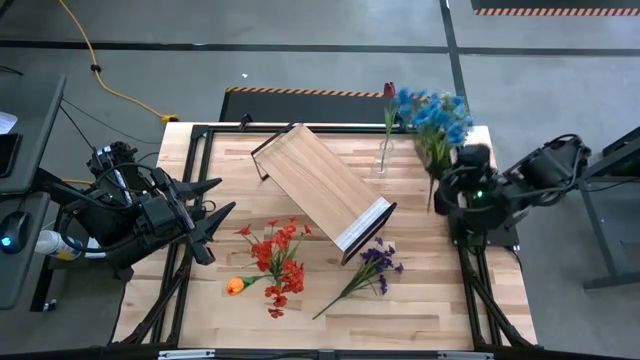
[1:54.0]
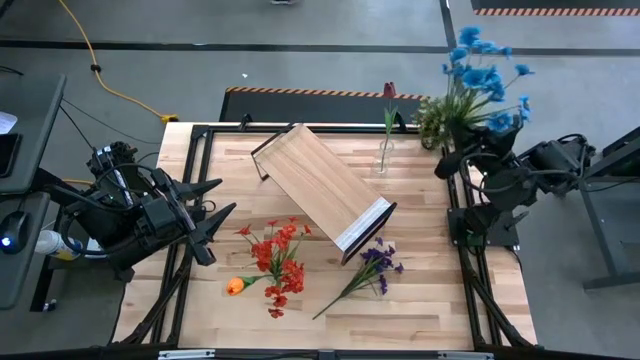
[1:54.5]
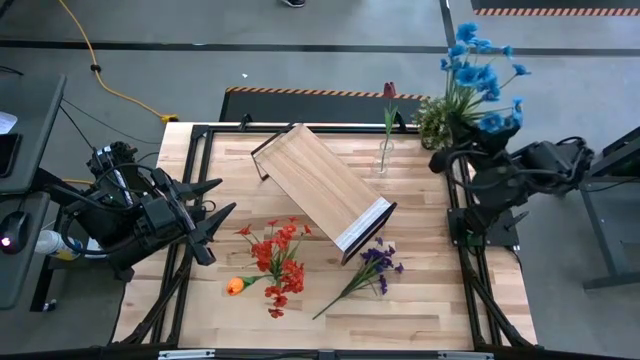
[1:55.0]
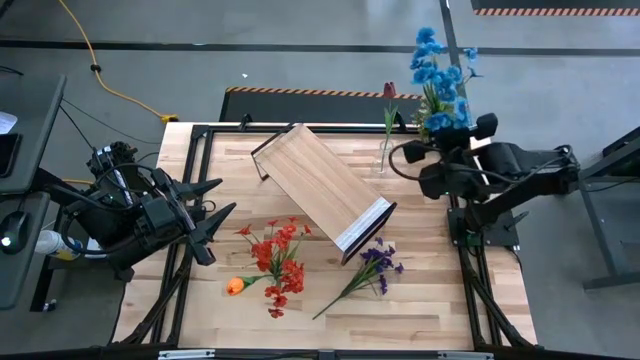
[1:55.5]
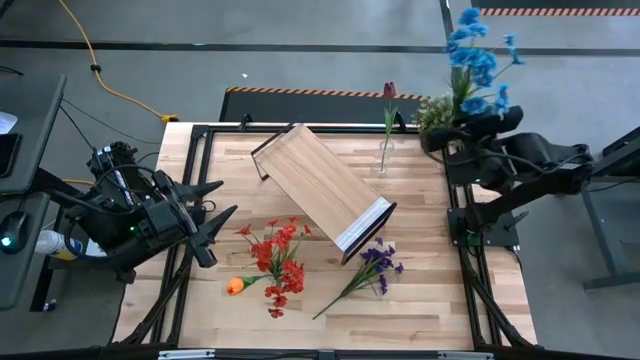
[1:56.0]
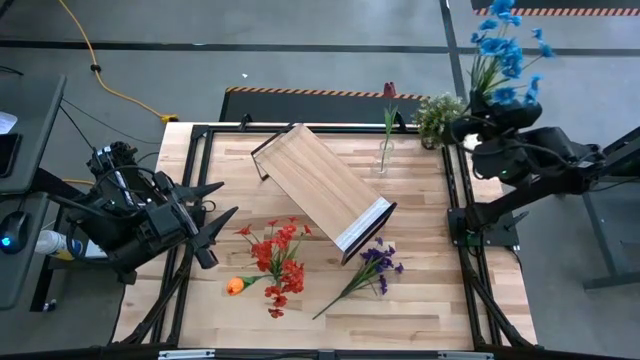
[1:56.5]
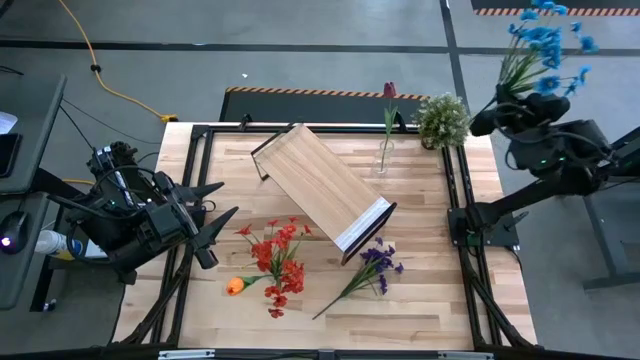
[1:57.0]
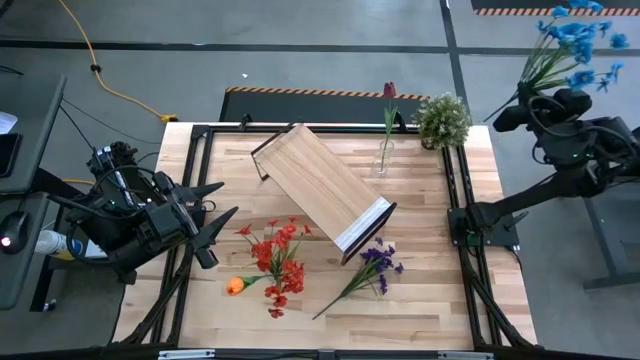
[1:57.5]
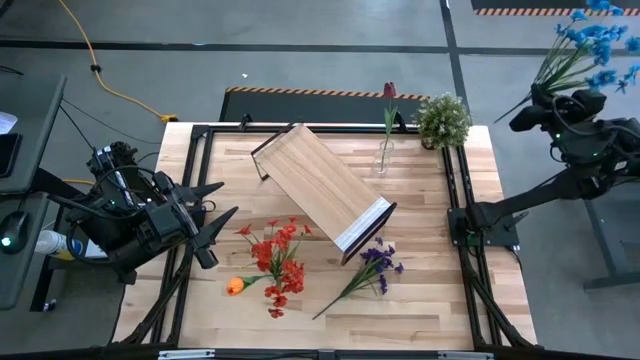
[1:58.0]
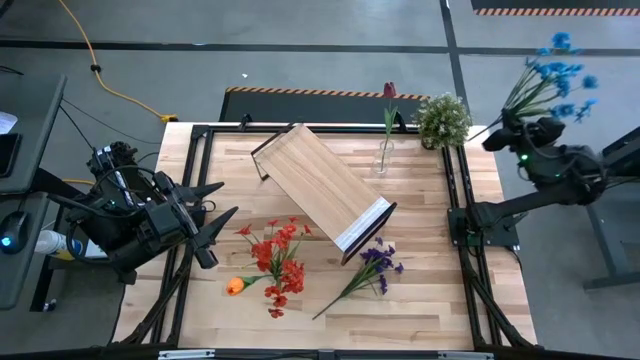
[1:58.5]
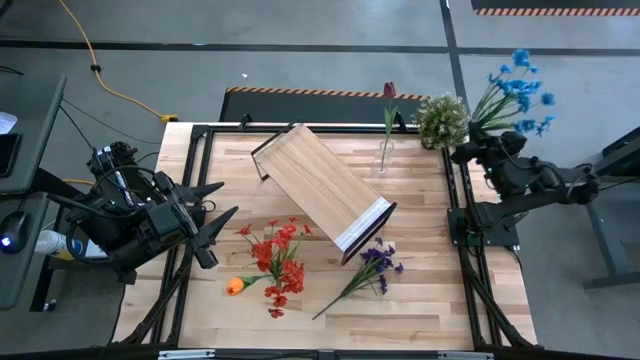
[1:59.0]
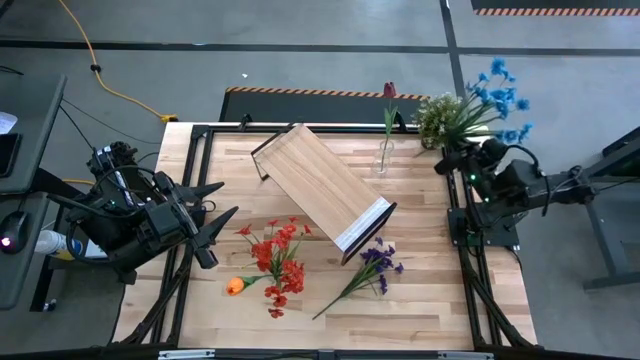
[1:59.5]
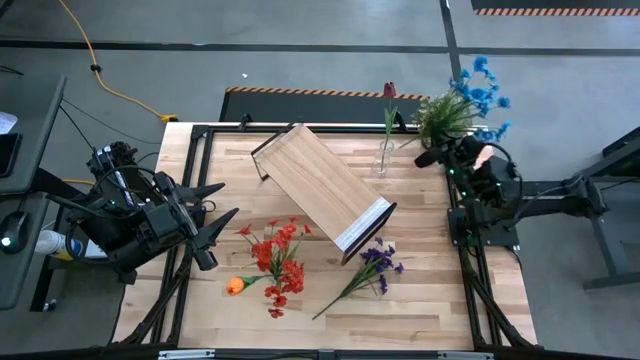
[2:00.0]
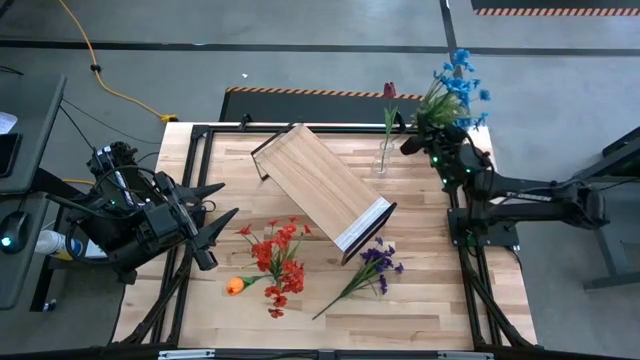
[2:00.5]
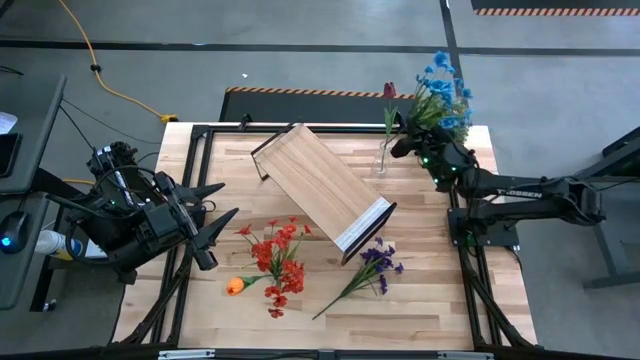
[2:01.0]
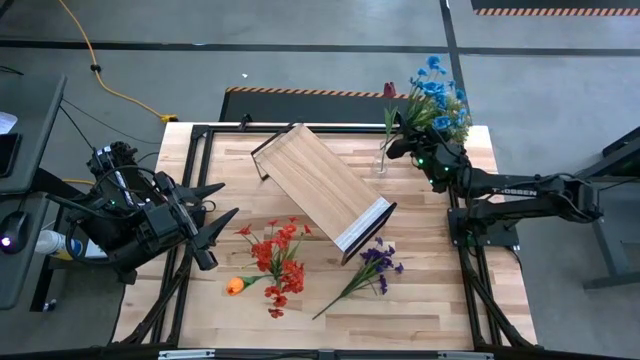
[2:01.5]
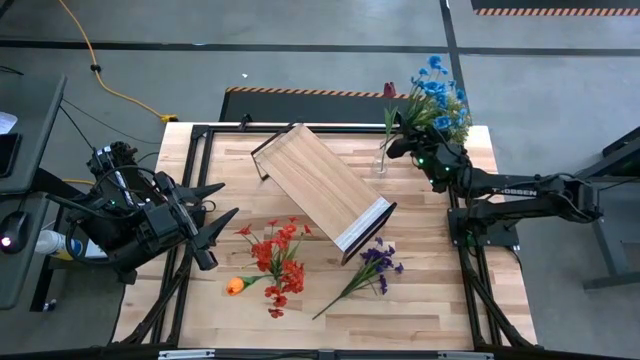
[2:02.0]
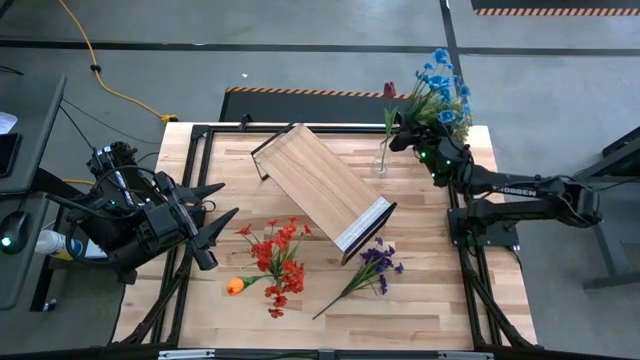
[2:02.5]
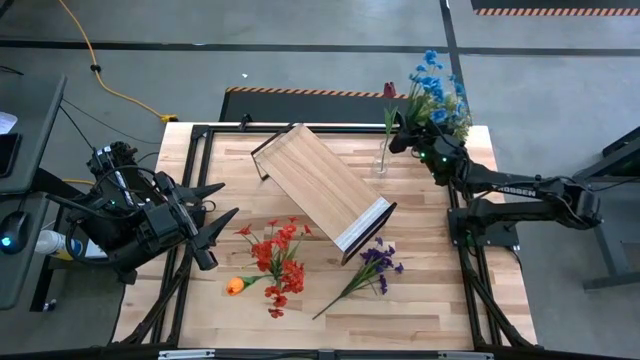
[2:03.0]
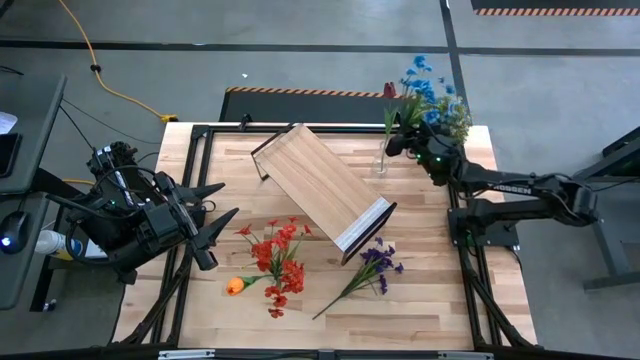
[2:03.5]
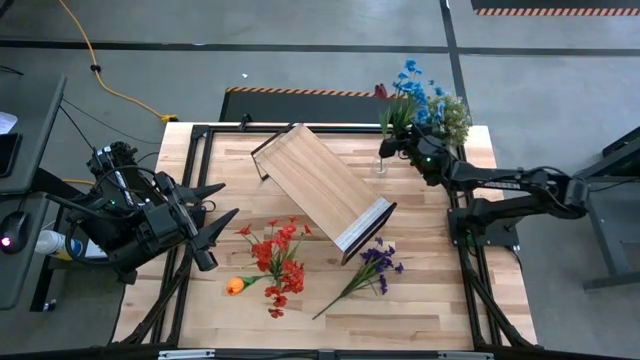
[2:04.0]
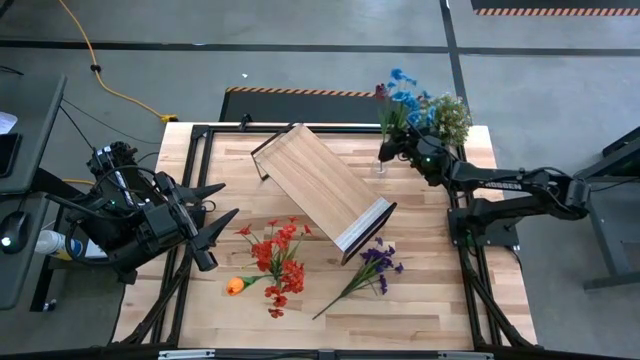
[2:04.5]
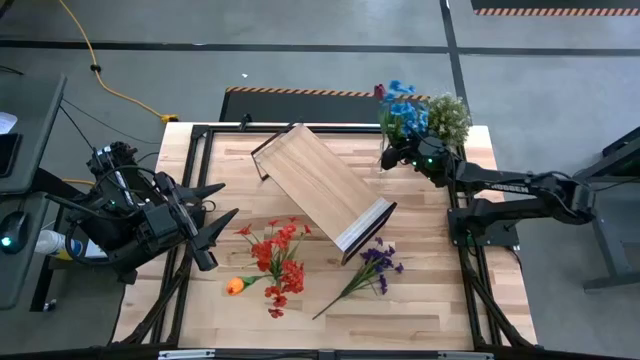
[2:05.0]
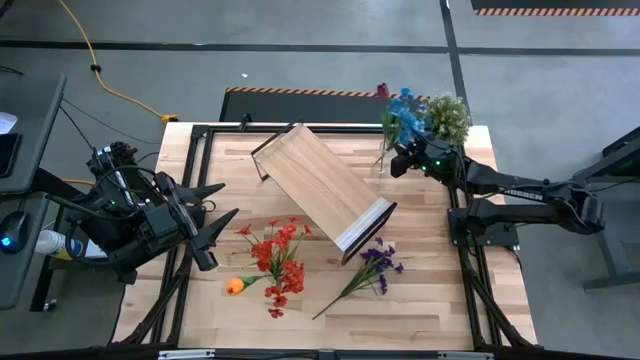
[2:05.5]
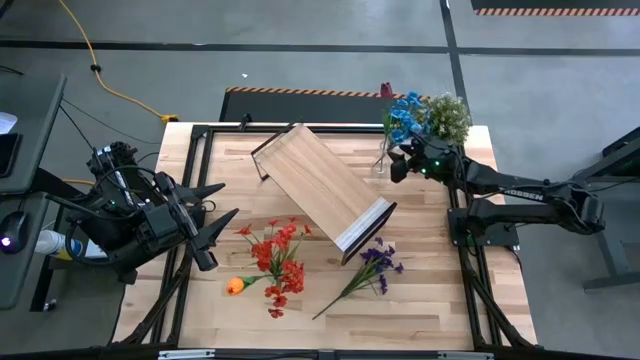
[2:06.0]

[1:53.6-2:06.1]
Task: Pick and place flowers into a vace then onto a shelf
Put the blue flowers into the top transparent vase

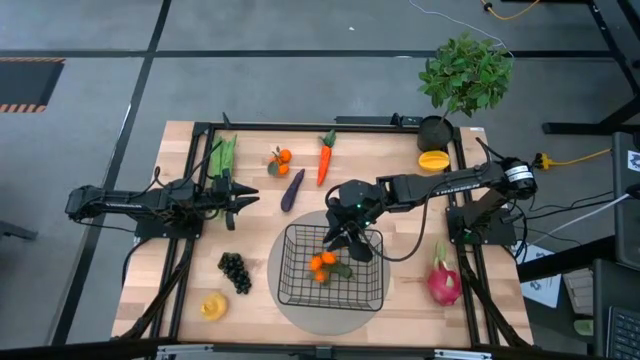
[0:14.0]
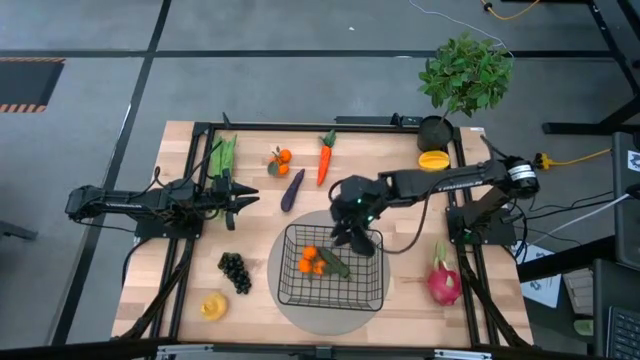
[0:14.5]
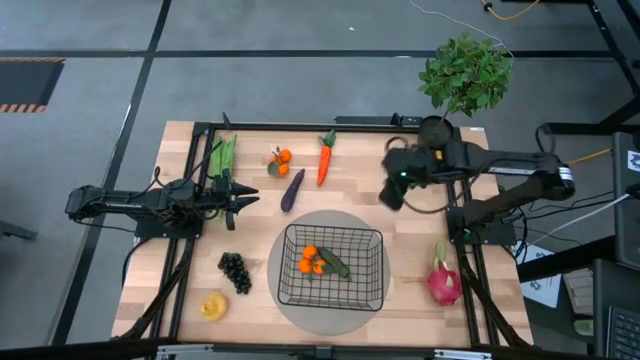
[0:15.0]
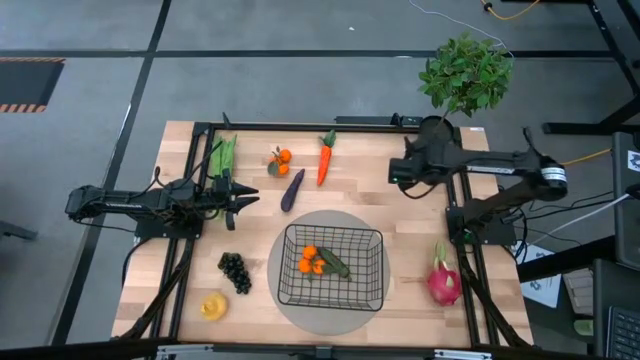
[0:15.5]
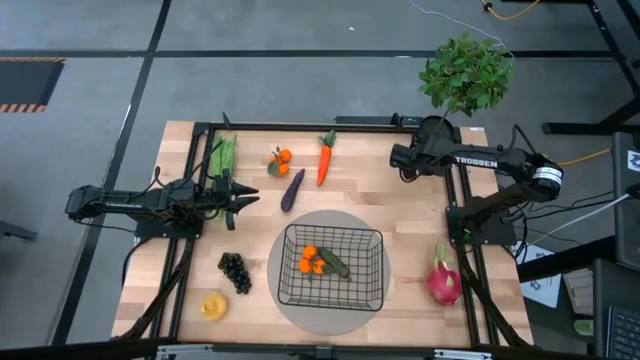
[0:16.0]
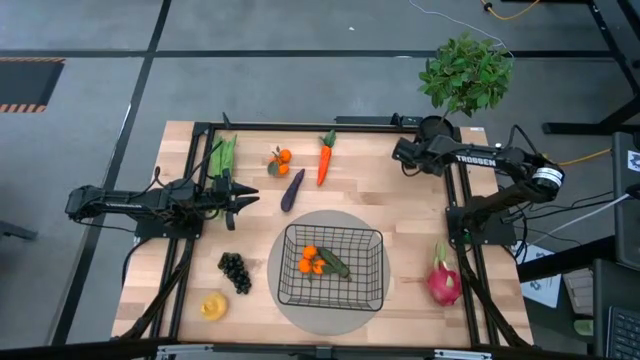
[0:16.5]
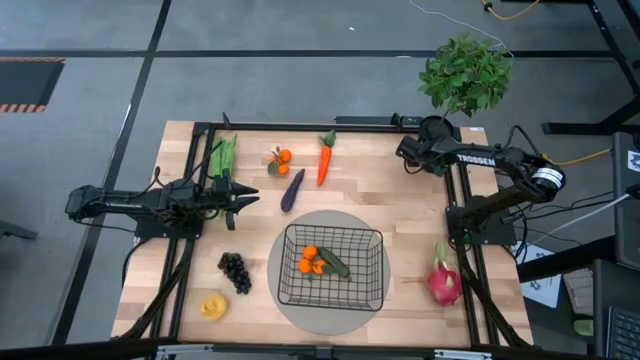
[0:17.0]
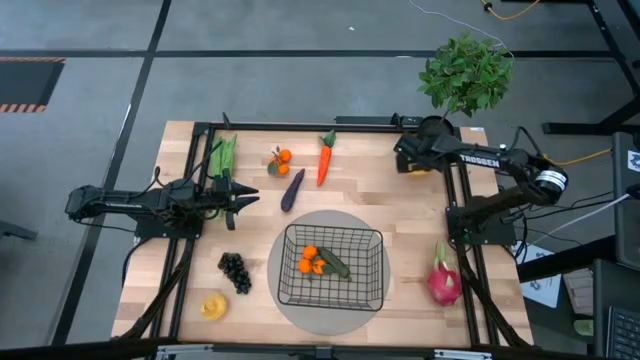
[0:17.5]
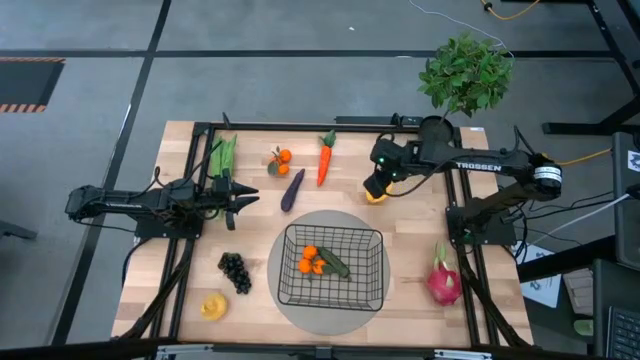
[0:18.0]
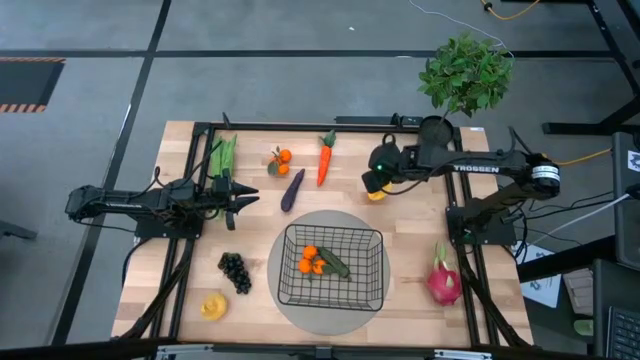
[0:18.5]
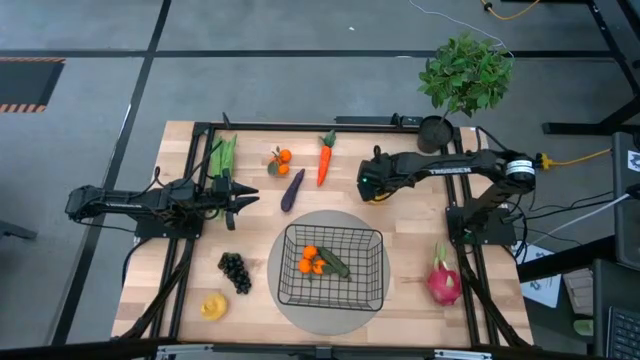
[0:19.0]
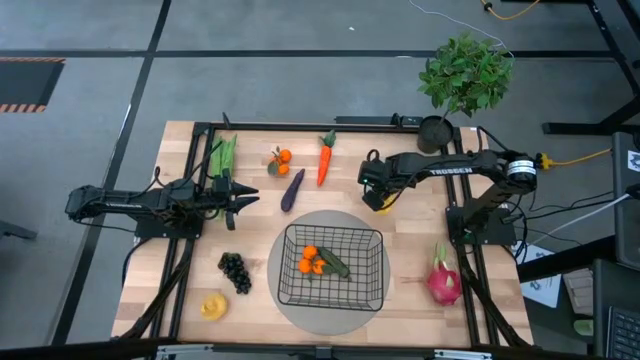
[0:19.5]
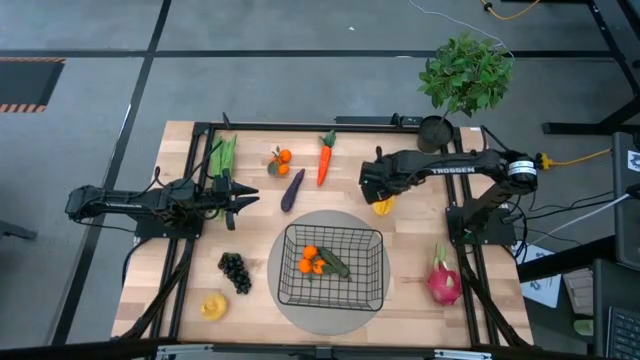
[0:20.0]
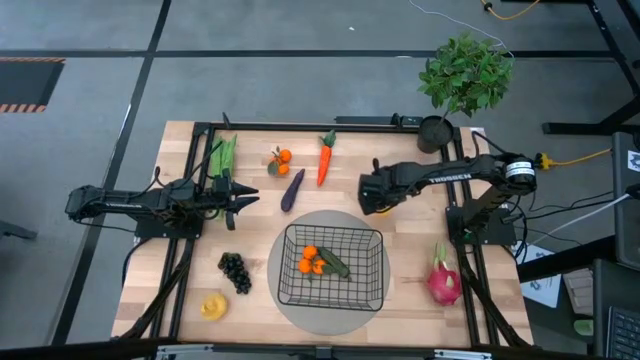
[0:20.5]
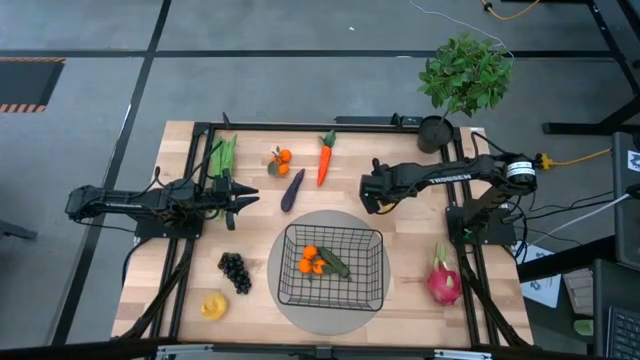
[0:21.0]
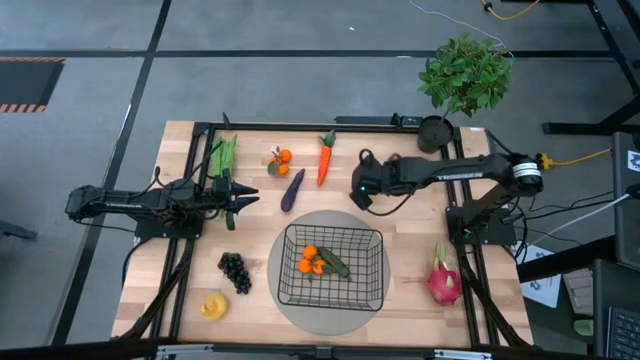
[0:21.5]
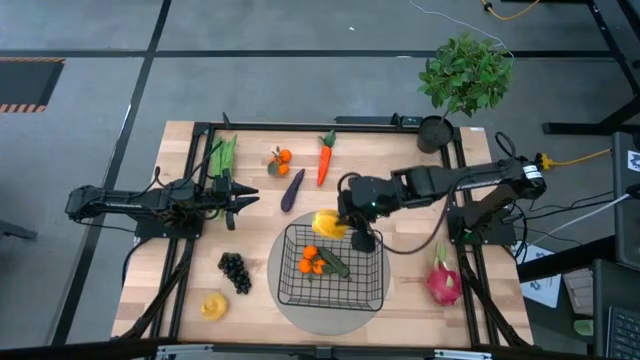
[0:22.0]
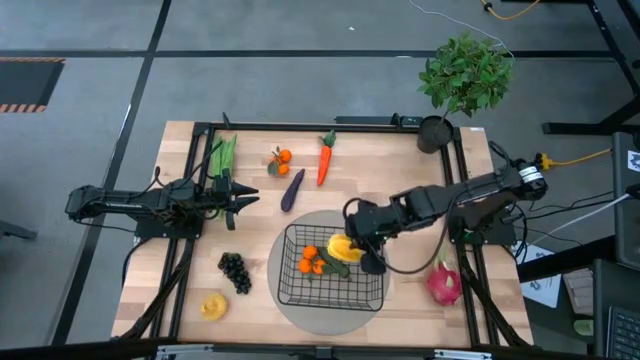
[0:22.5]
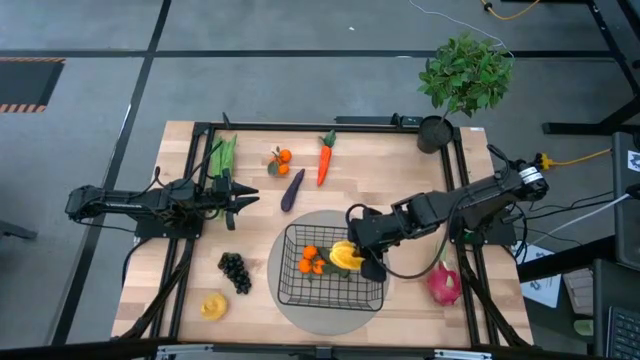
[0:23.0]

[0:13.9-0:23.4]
Task: Build produce basket
Put the yellow starfruit into the black wire basket
